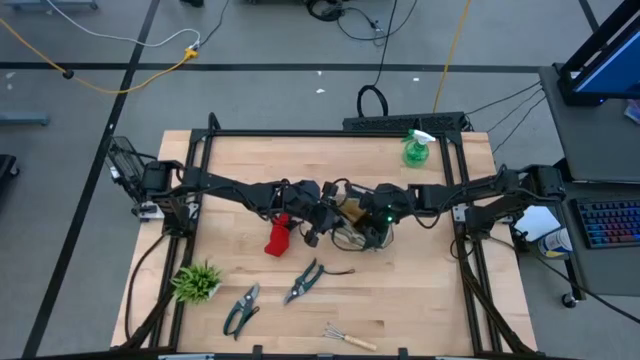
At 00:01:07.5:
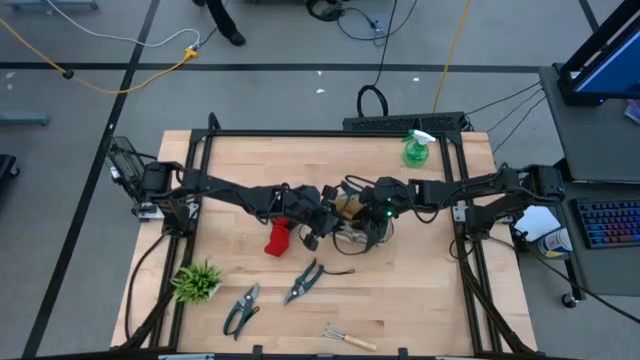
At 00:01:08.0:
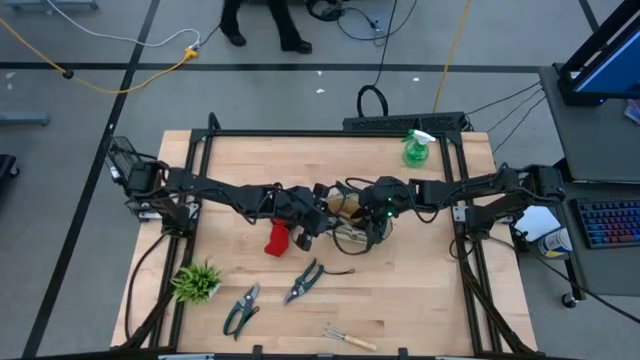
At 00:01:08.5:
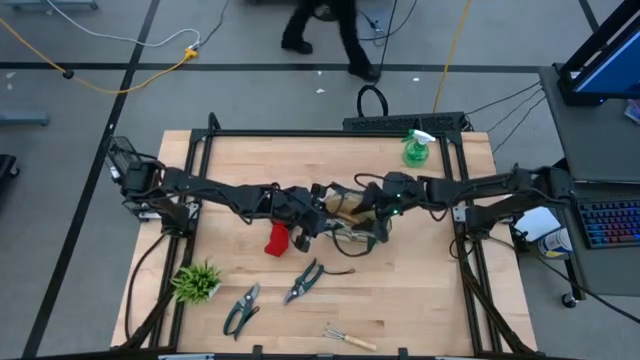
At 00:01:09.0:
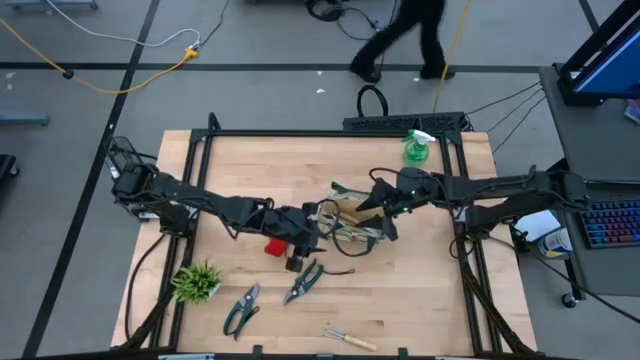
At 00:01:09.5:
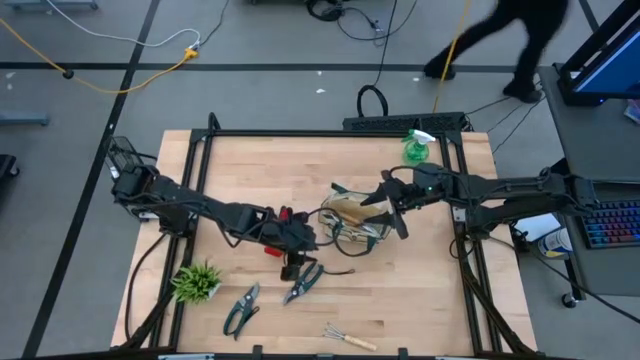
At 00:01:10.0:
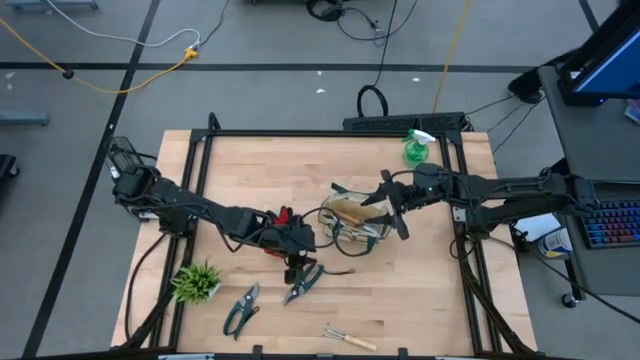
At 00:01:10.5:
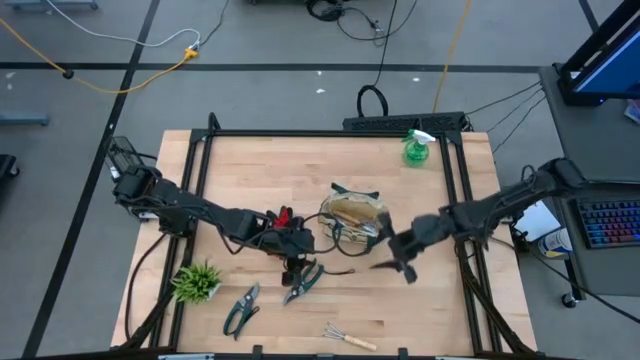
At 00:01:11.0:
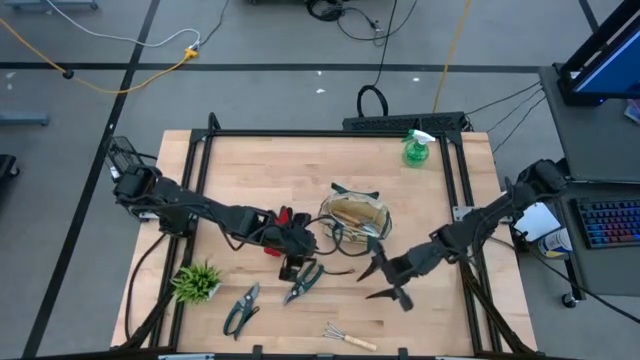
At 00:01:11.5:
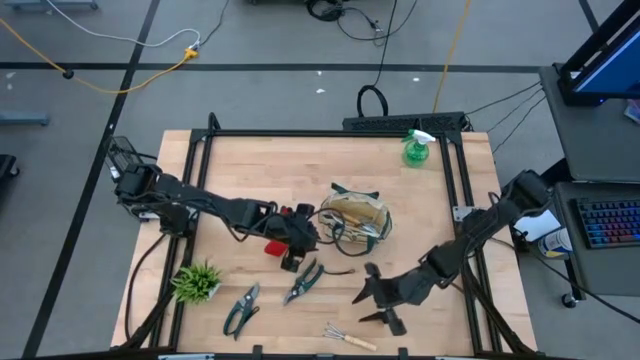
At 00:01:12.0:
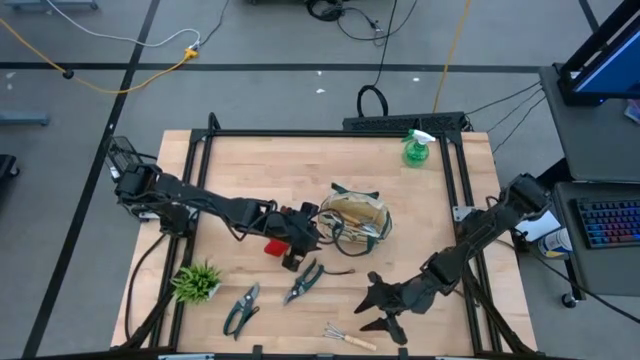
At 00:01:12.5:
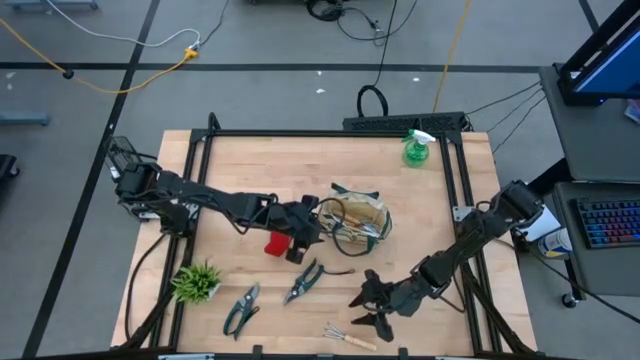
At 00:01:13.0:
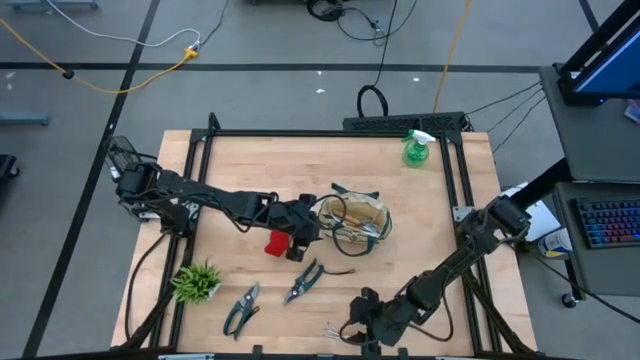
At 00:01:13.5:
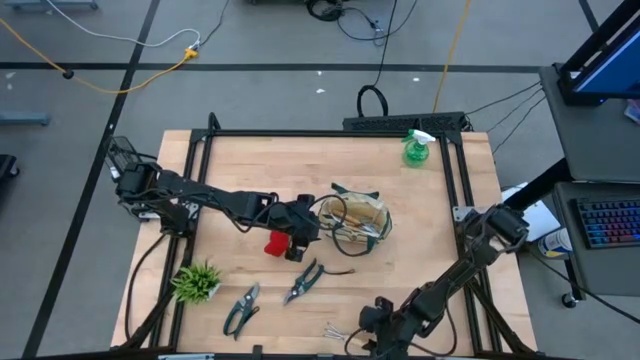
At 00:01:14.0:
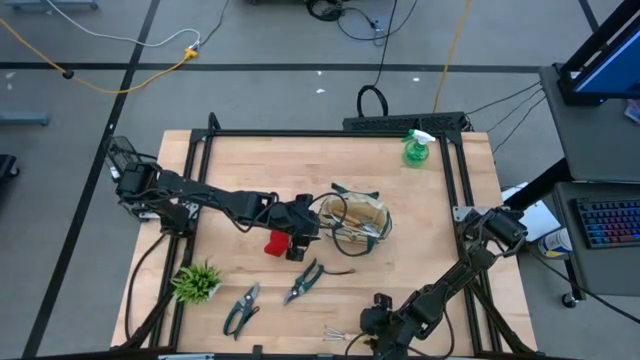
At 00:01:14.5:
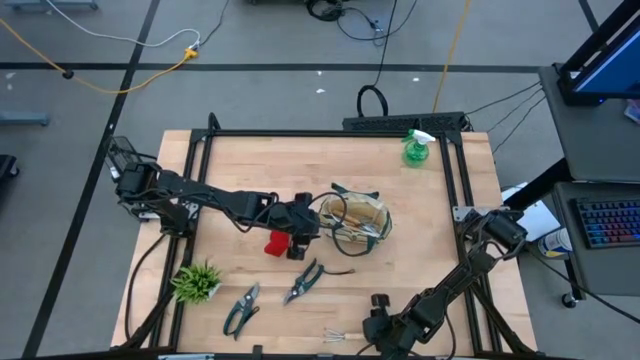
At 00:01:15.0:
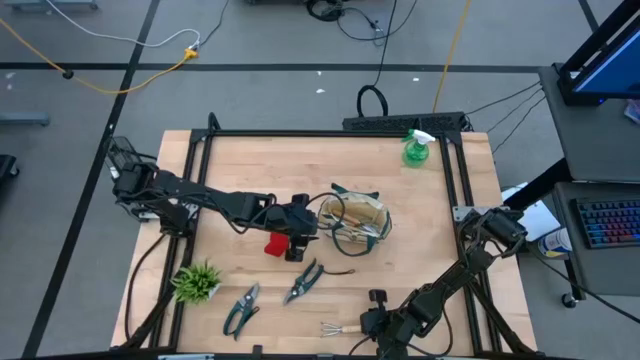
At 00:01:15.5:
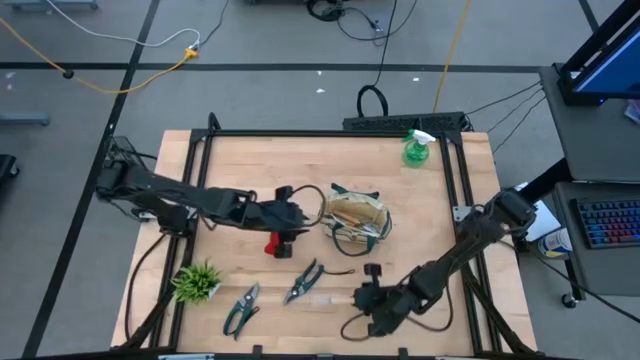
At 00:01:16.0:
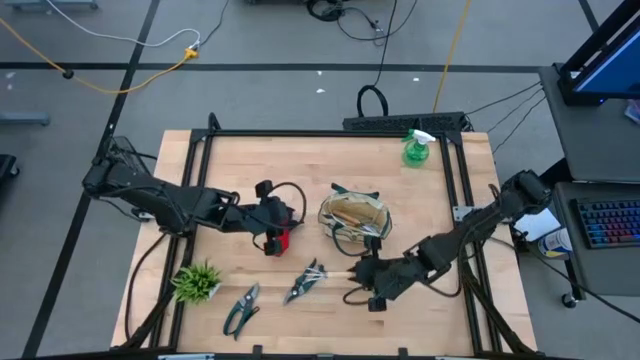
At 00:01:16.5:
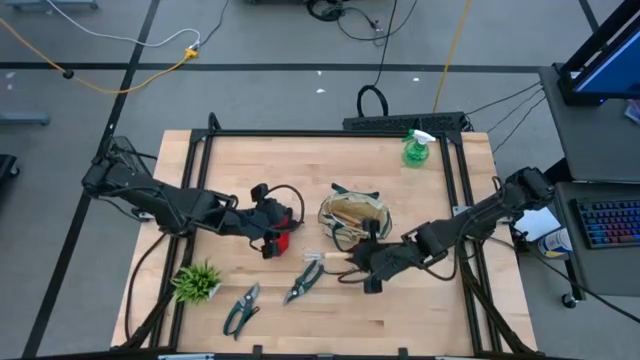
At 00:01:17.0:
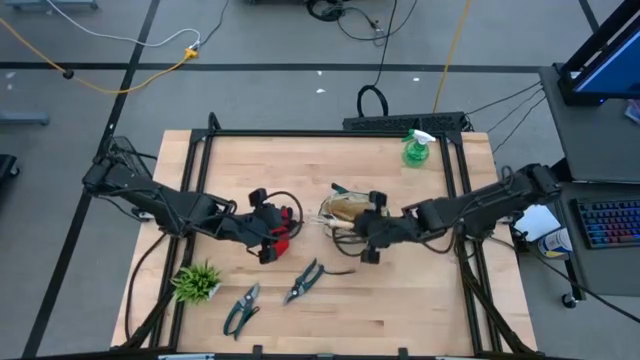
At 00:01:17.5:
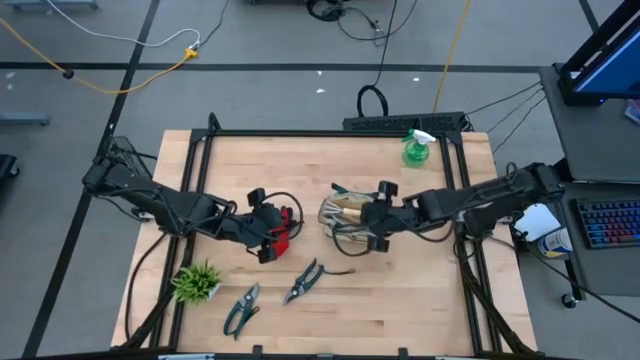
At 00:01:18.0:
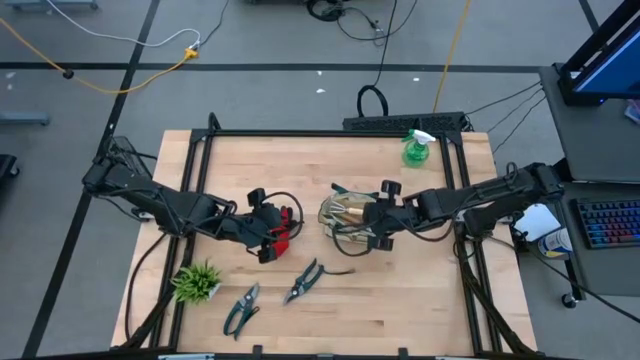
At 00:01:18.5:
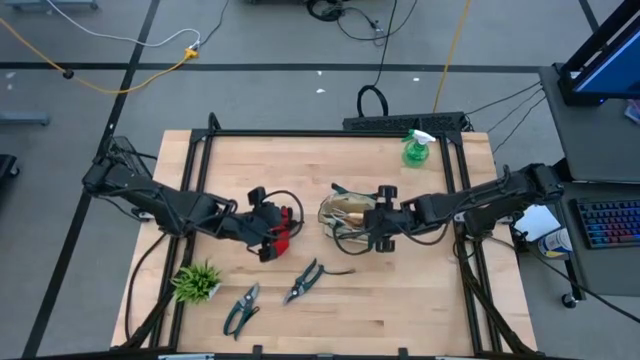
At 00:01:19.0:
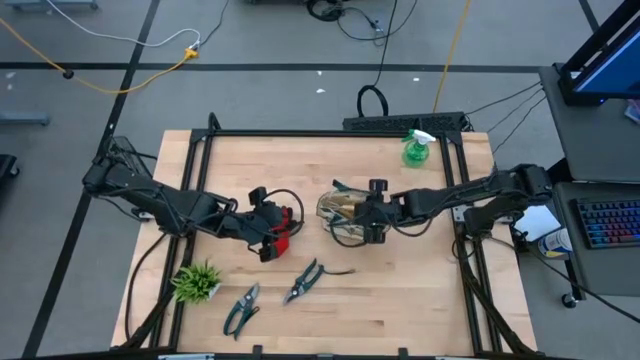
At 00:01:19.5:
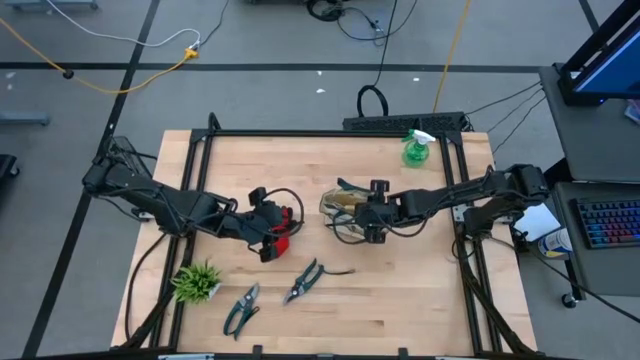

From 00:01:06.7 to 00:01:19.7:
Task: Pick & Place Garden tools in Gardening bag
Put the brown hand rake into the gardening bag

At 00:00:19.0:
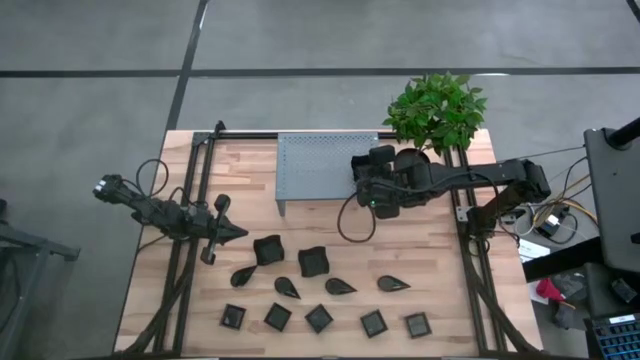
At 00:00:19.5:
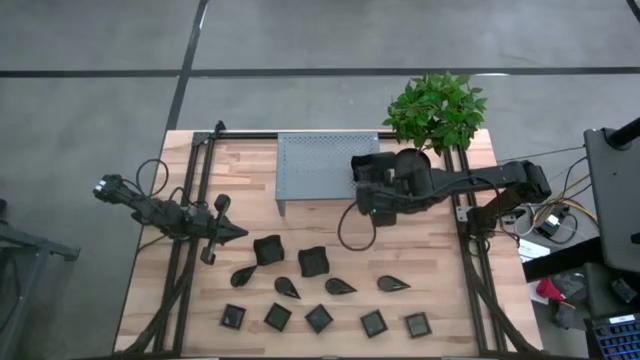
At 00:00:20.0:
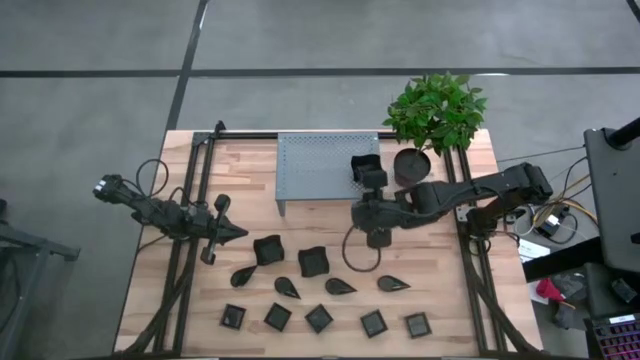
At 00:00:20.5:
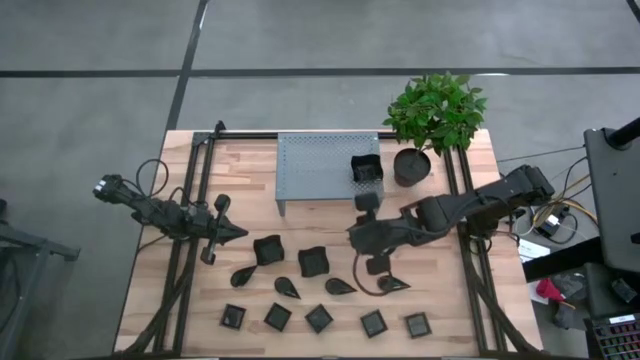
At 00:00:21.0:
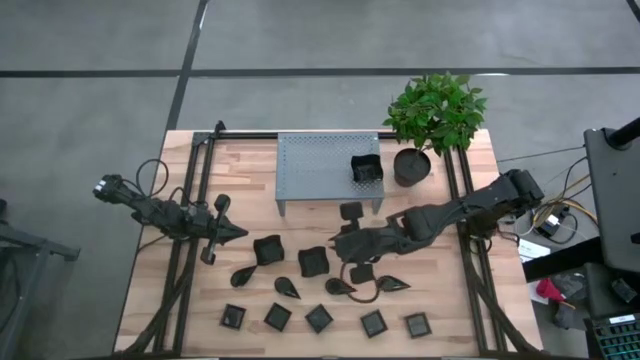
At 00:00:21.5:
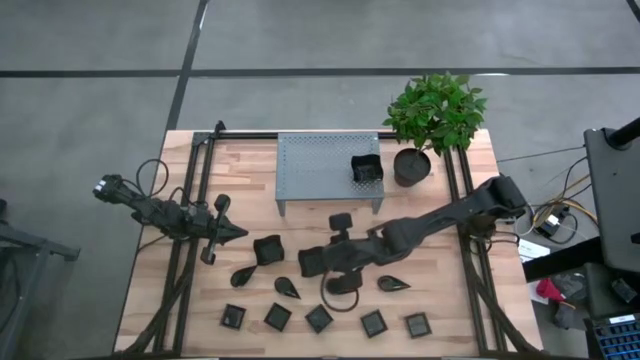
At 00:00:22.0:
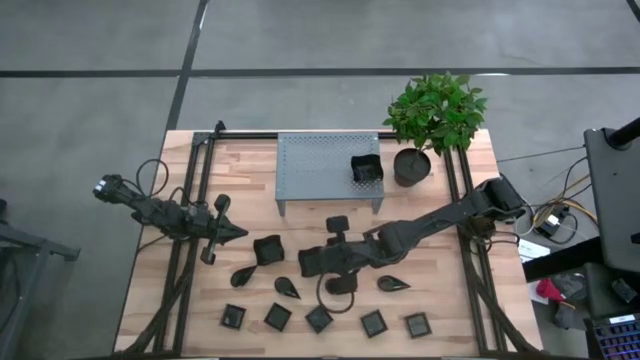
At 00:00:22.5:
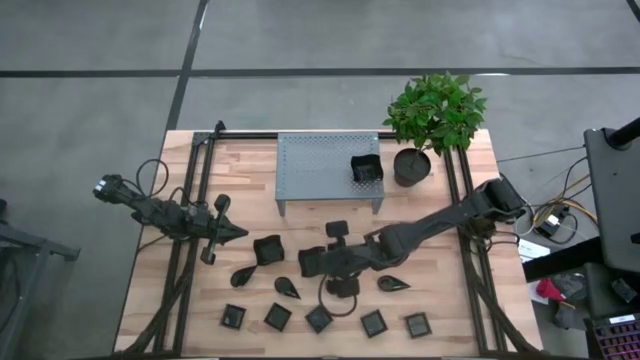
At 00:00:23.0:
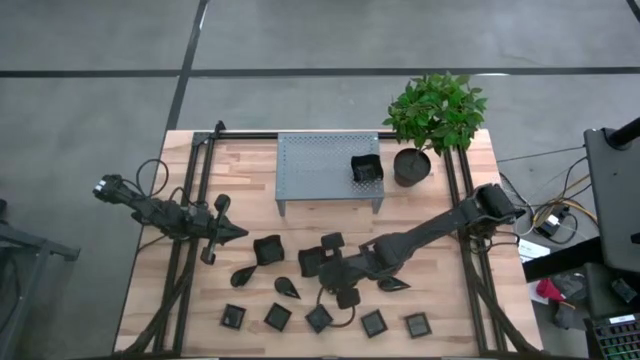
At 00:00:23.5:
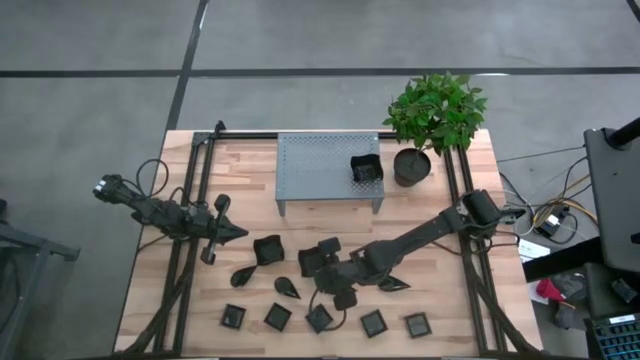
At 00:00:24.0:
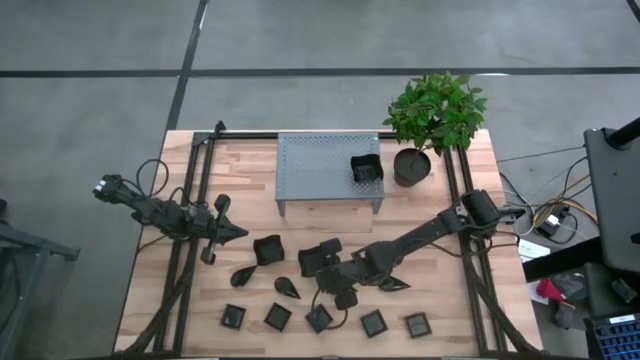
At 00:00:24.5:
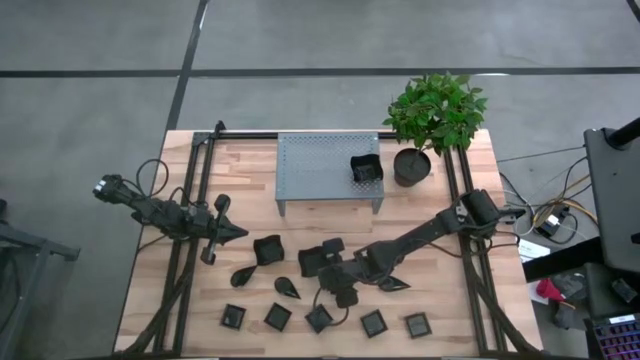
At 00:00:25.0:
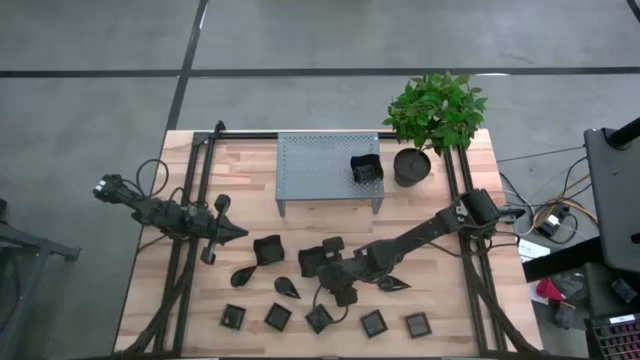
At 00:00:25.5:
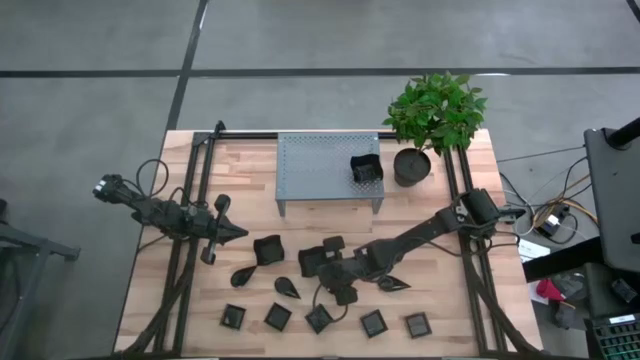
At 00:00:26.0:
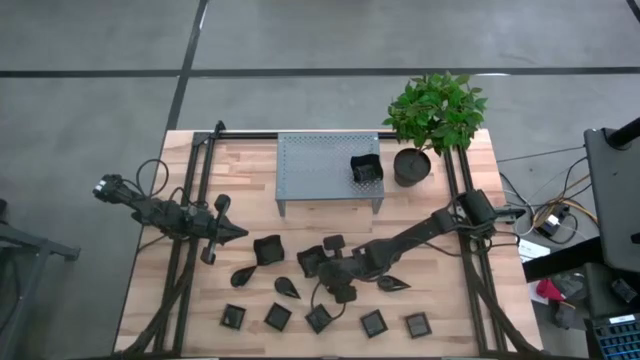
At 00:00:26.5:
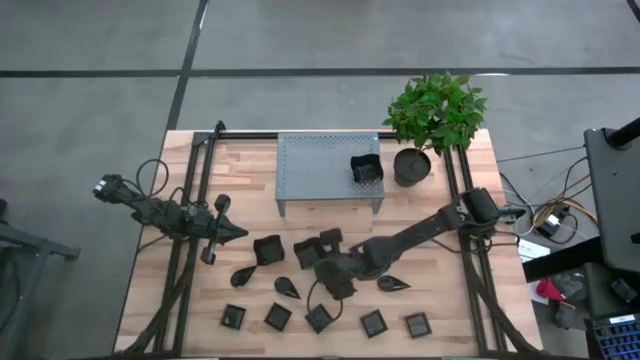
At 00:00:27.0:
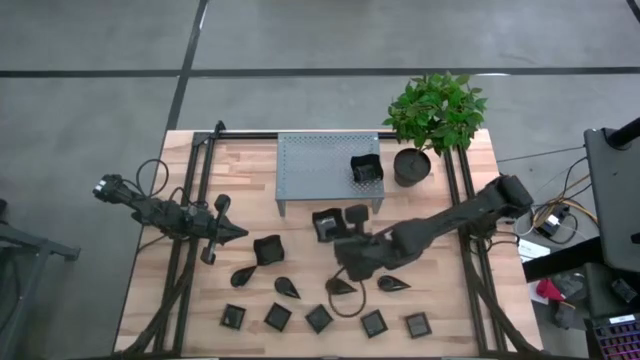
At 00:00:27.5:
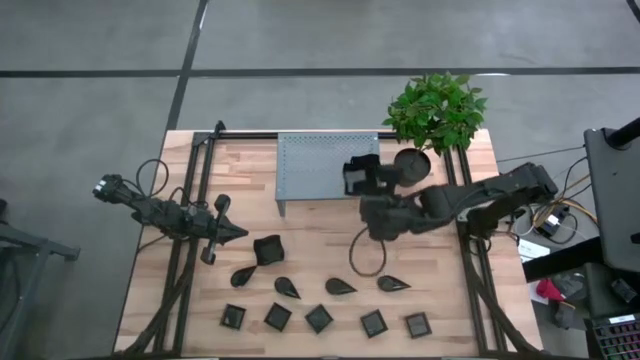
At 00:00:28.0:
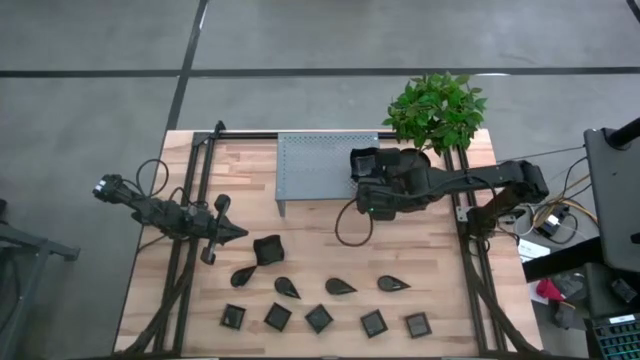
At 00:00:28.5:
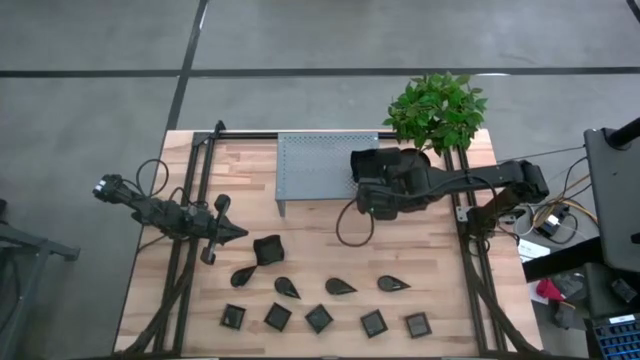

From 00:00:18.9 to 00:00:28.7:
Task: Pick & Place Mini shaped plates
Stack the black distorted square plate on top of the black distorted square plates on the shelf
